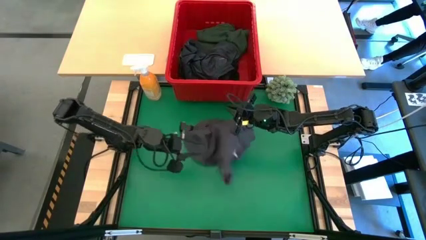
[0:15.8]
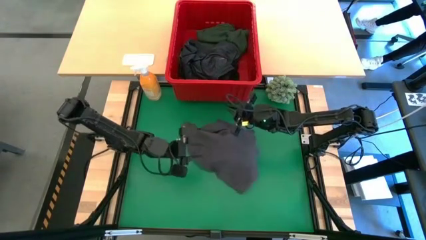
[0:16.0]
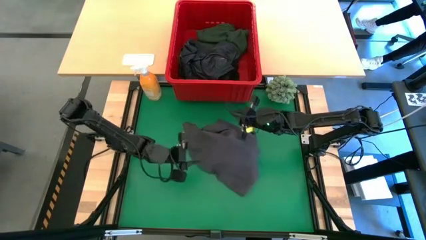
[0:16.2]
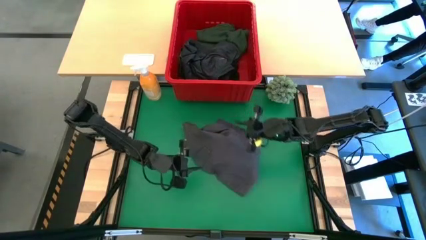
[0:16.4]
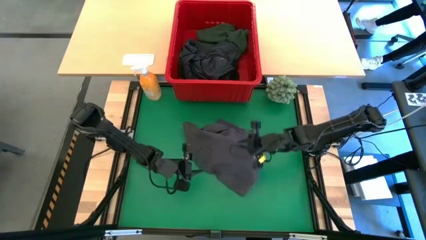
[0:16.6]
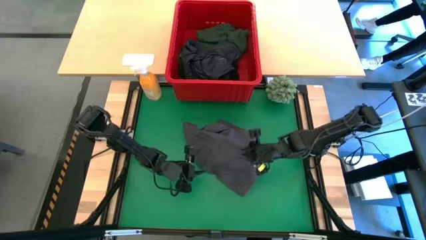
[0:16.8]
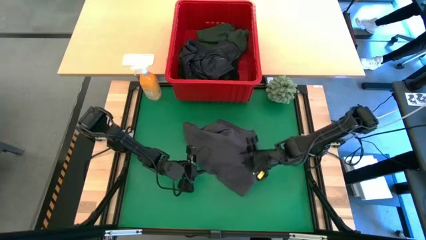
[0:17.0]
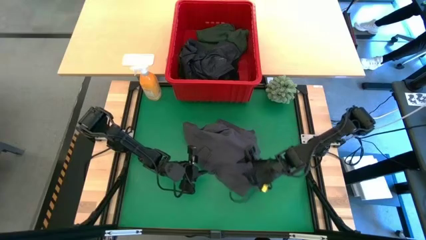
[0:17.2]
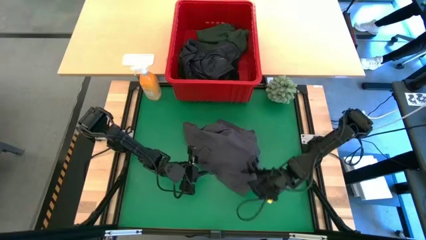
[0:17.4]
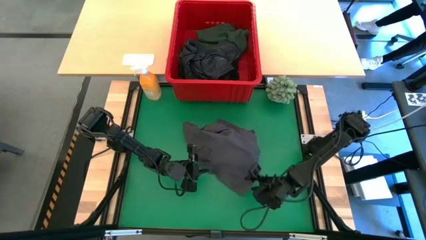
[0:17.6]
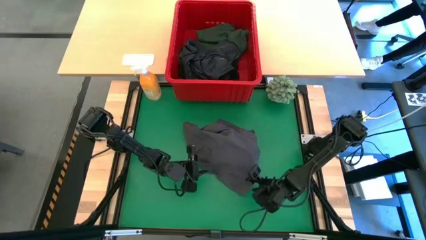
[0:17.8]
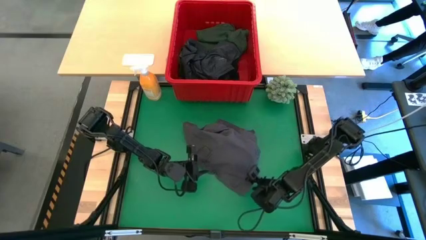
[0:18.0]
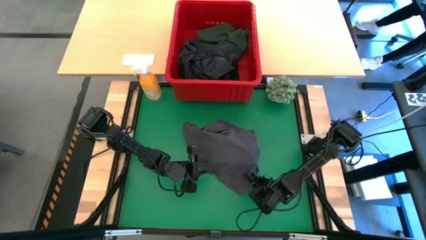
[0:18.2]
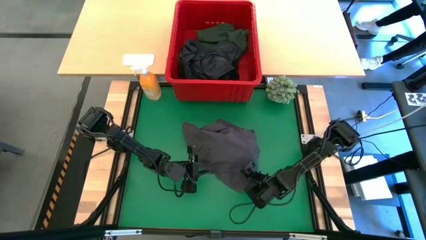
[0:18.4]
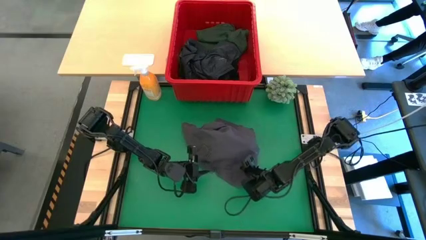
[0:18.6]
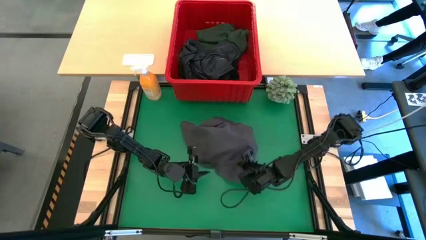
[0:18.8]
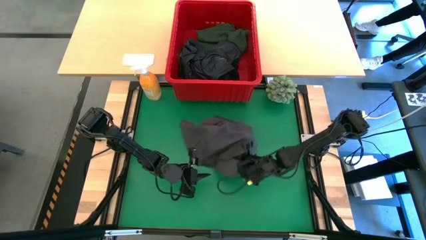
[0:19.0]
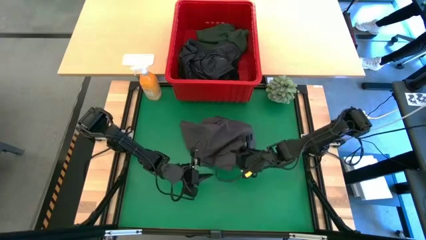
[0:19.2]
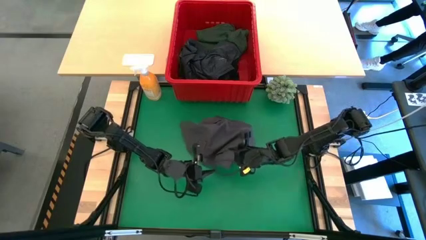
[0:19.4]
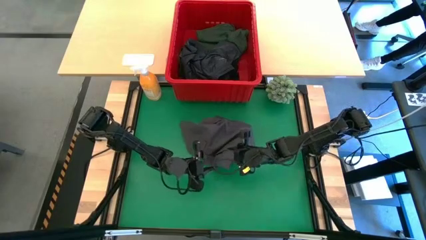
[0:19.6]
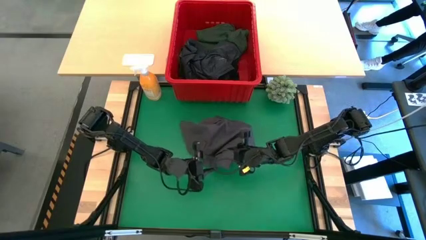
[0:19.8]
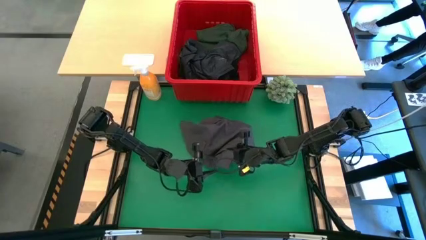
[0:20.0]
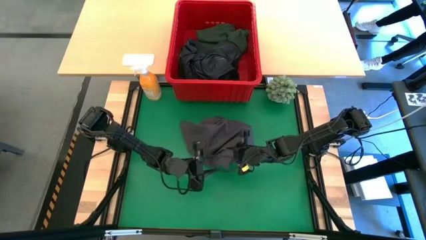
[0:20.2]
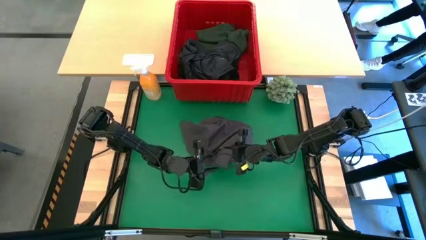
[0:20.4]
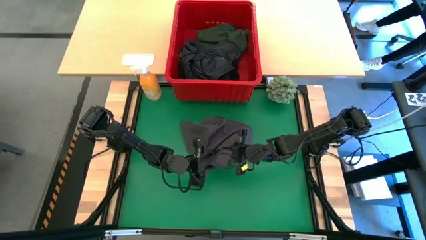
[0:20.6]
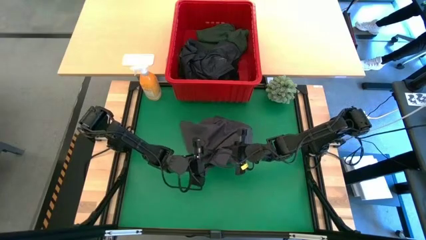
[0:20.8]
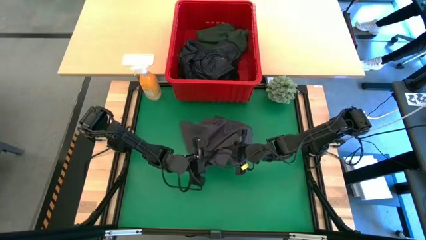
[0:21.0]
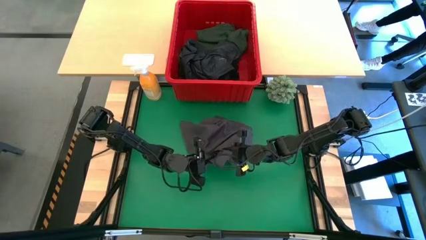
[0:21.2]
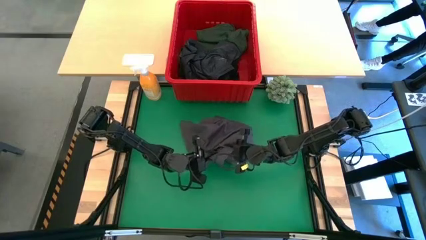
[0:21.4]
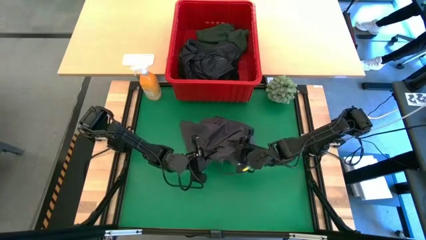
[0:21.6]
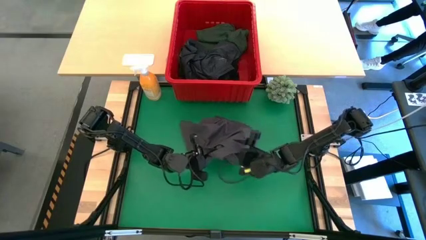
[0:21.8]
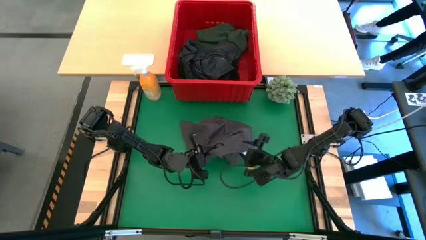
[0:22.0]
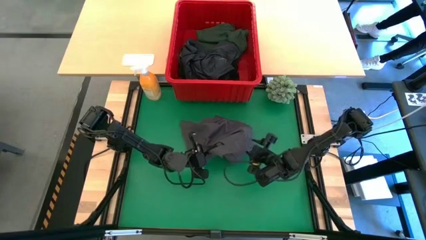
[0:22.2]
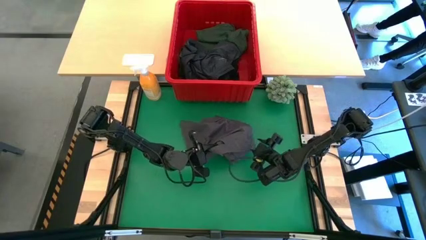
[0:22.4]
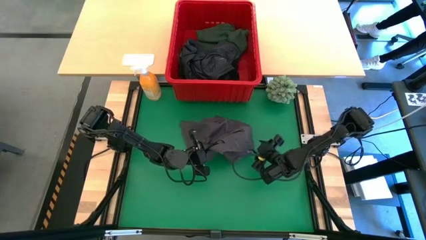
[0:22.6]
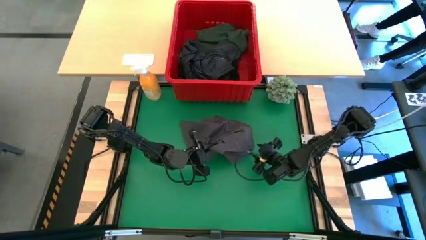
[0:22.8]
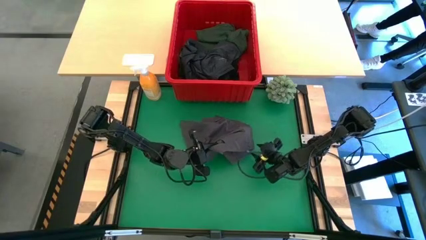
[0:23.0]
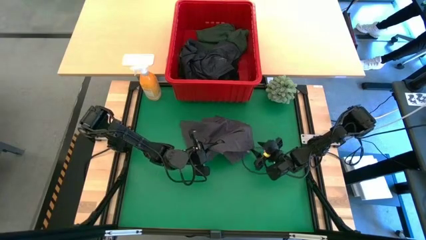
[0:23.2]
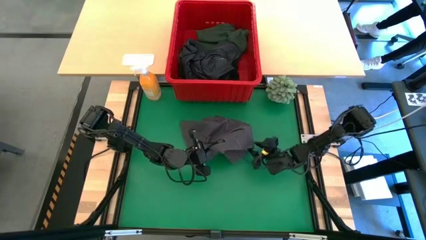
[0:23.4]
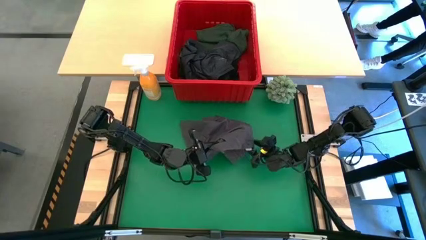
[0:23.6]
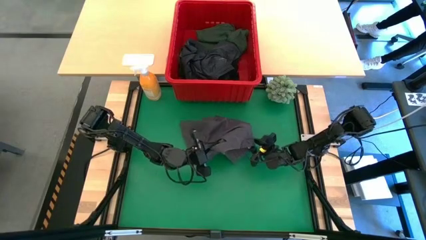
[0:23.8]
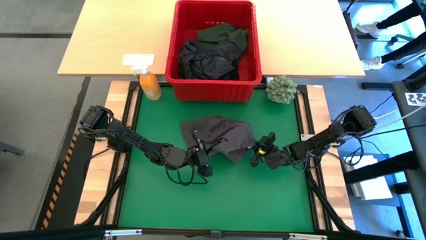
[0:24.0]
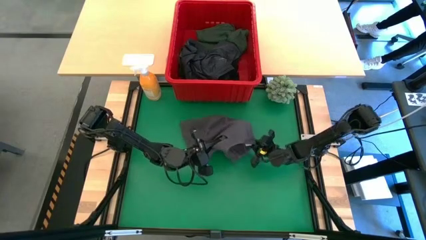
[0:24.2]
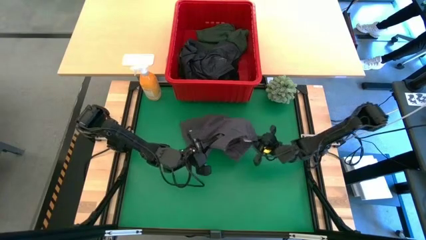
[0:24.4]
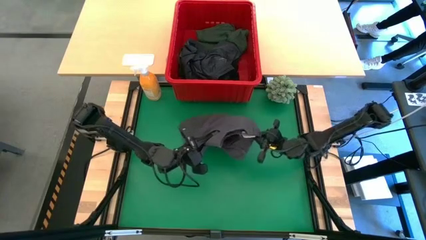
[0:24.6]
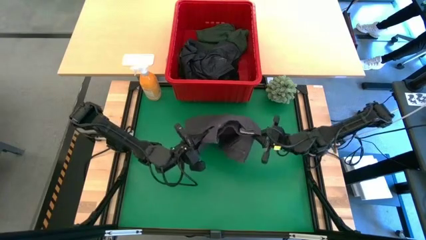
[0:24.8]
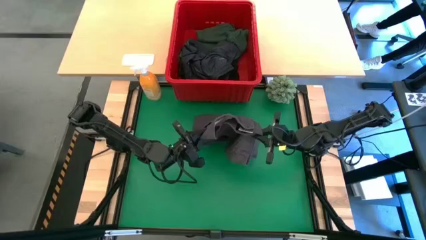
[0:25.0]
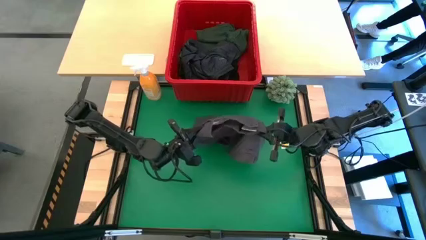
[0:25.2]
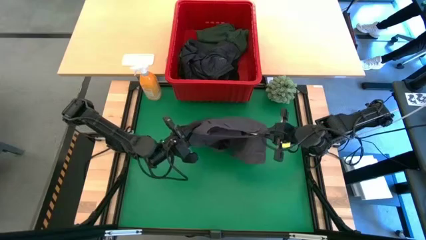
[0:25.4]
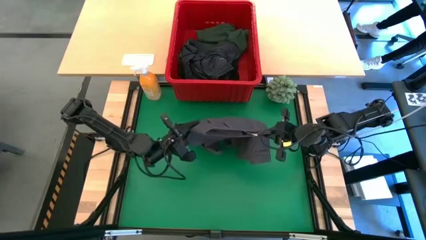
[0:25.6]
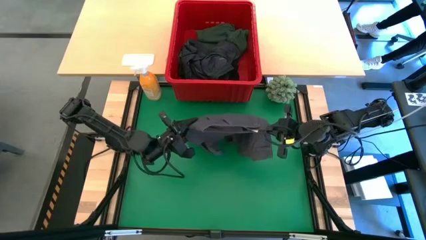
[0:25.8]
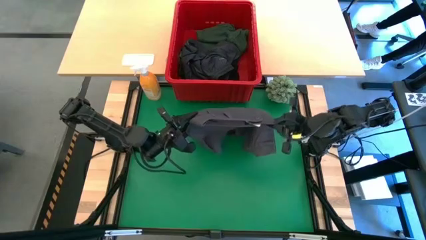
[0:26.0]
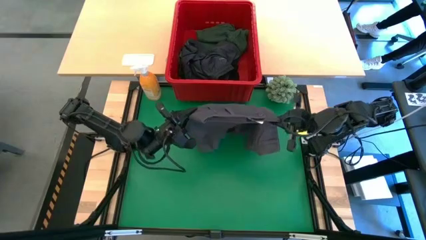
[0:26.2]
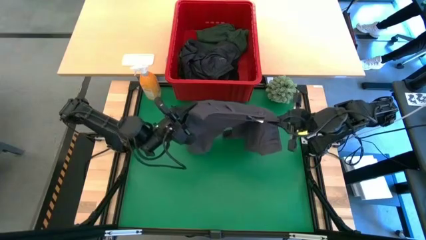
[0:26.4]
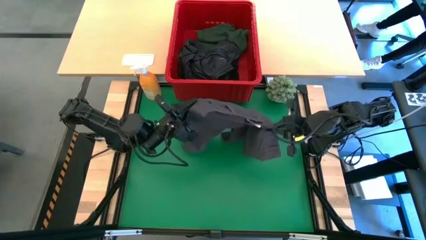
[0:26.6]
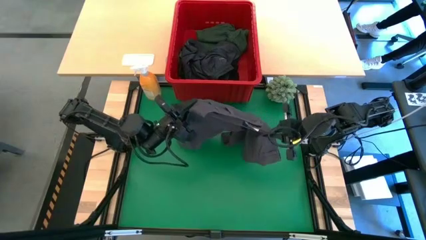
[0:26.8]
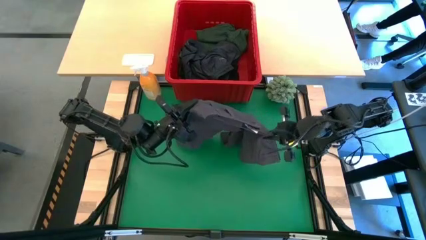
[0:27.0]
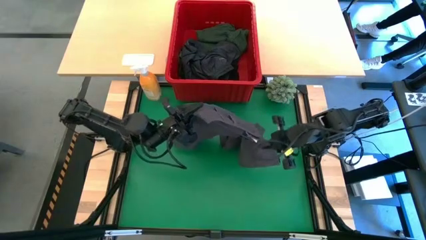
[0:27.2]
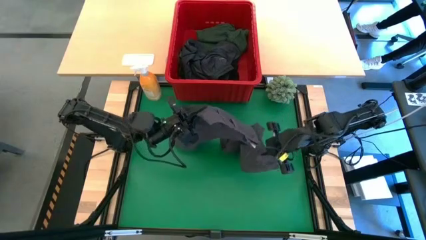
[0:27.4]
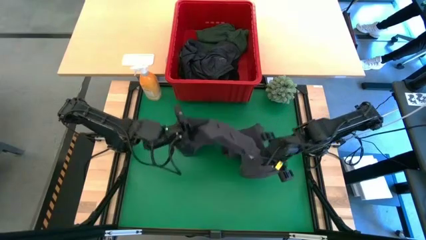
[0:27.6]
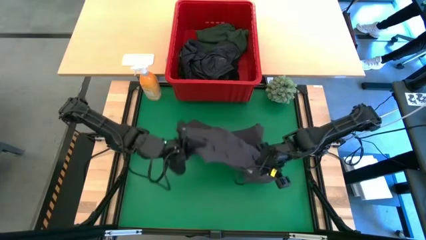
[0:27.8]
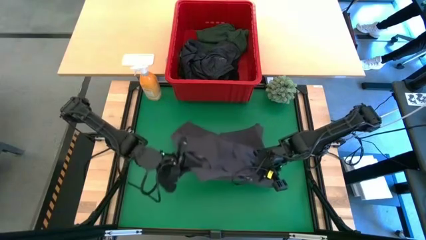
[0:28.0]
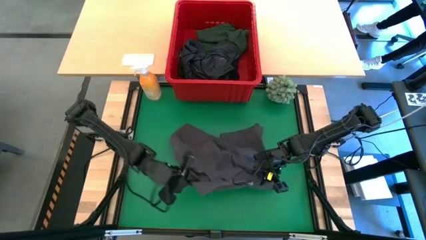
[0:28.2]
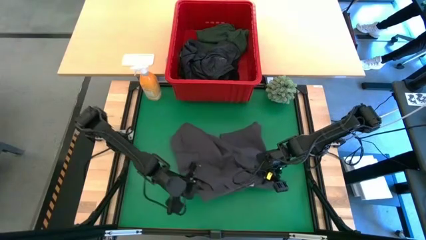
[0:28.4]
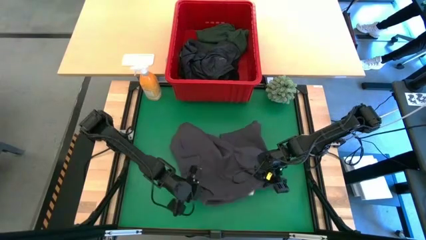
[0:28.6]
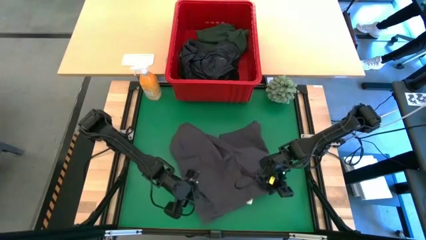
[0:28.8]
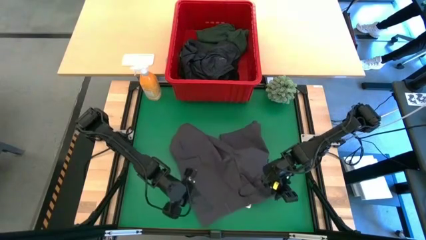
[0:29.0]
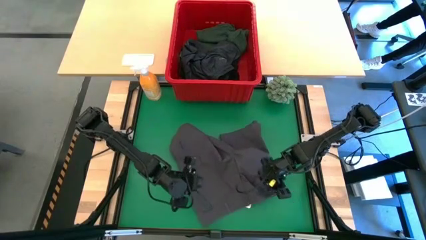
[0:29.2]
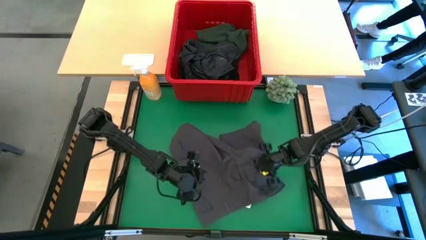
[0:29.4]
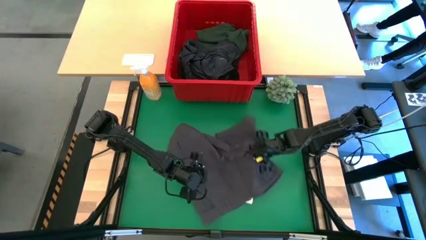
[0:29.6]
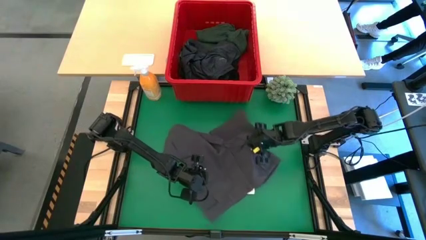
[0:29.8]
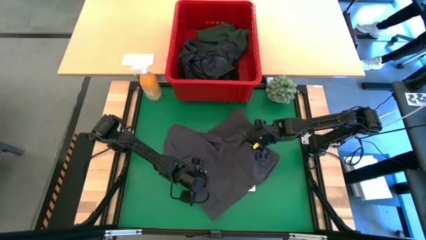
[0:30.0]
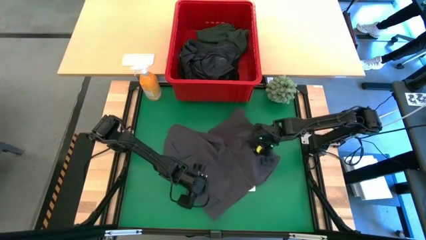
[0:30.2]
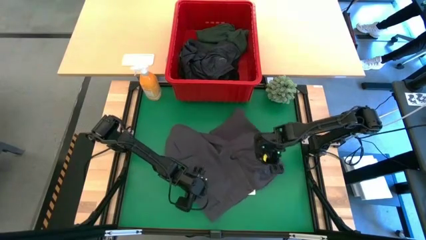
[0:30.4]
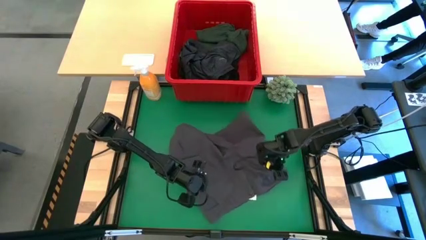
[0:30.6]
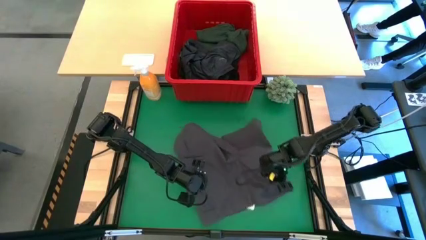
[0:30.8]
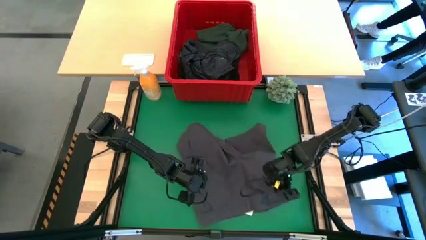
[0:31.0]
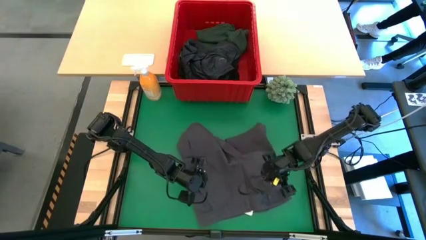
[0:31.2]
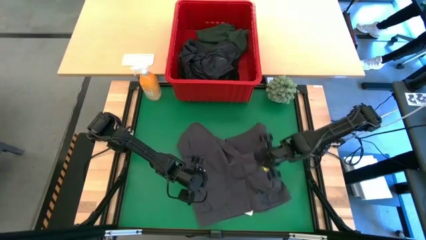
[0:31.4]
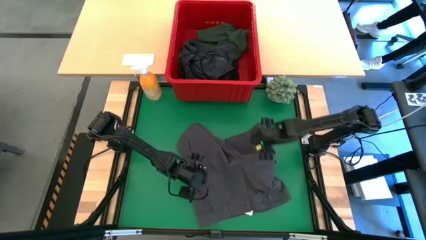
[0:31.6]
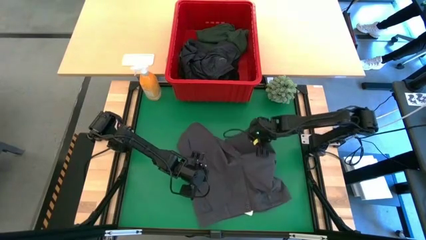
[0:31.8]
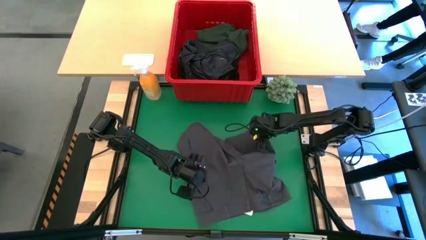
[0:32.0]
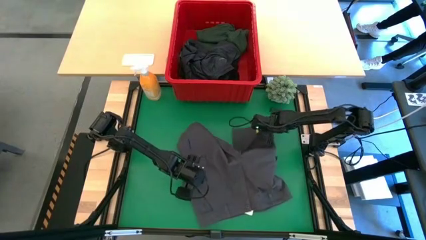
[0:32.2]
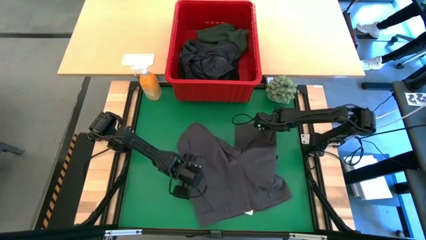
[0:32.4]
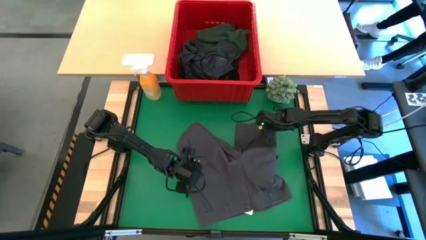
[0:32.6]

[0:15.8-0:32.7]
Task: Fold Laundry from Bin
Fold the gray short
